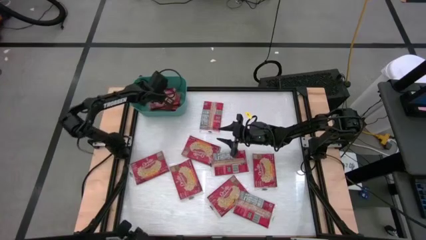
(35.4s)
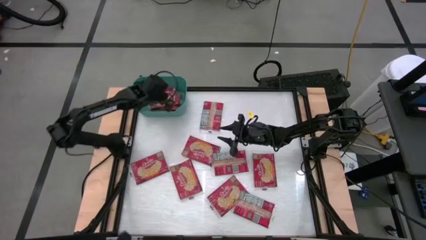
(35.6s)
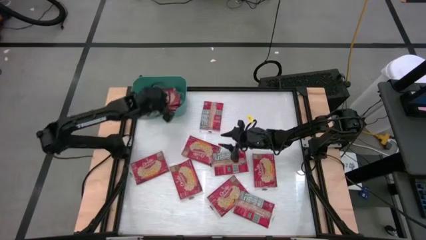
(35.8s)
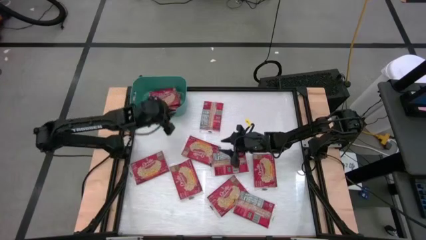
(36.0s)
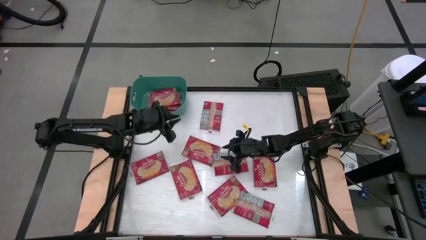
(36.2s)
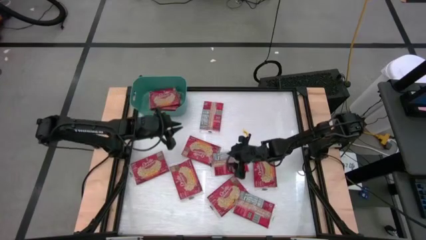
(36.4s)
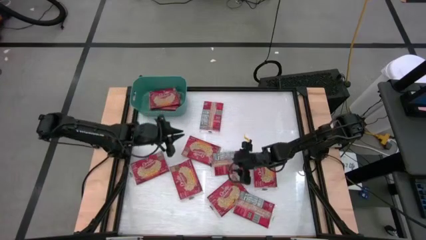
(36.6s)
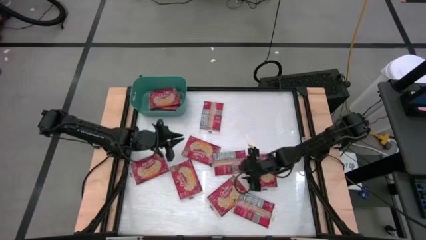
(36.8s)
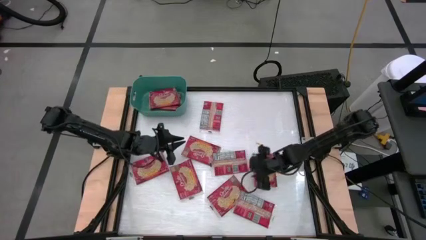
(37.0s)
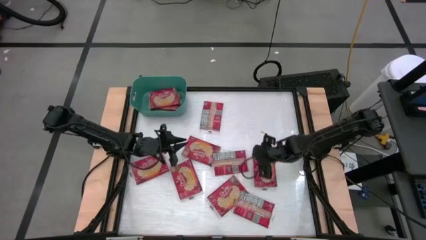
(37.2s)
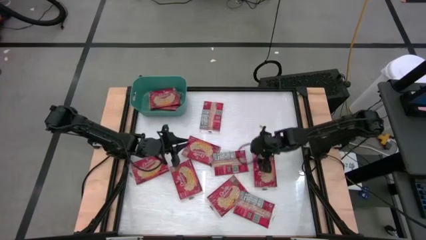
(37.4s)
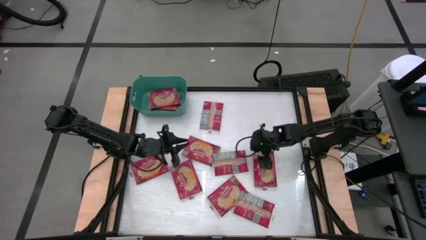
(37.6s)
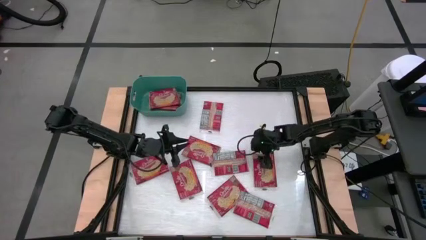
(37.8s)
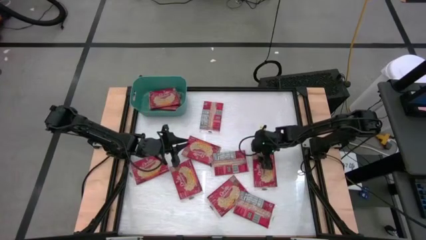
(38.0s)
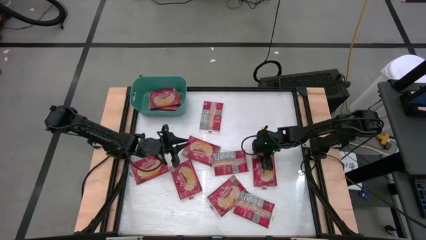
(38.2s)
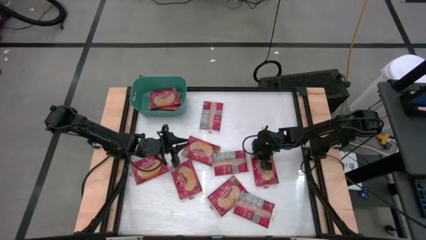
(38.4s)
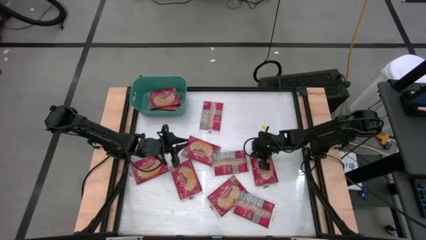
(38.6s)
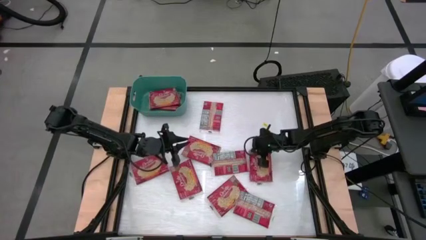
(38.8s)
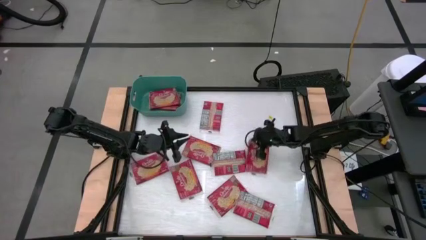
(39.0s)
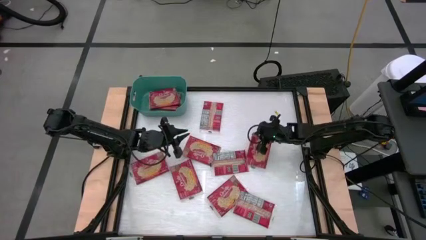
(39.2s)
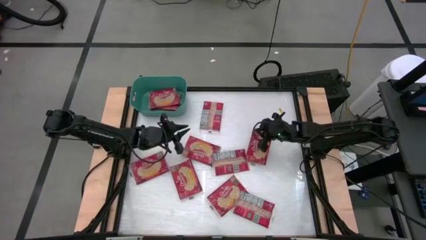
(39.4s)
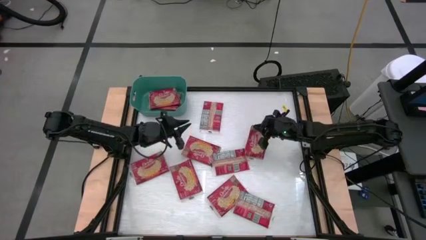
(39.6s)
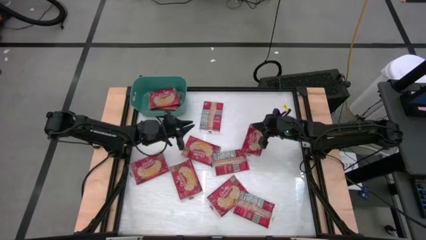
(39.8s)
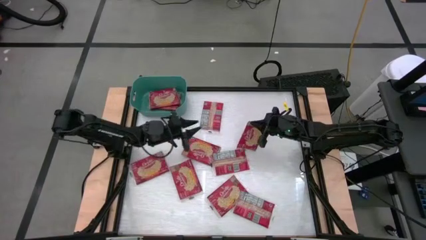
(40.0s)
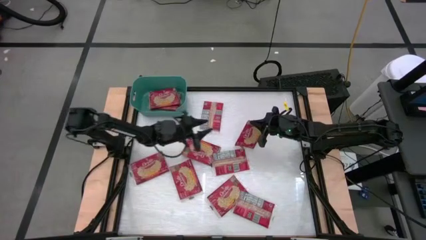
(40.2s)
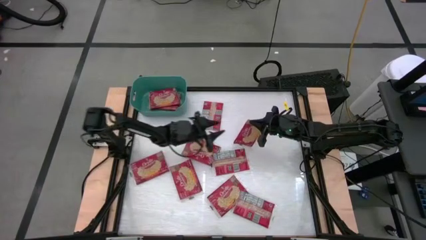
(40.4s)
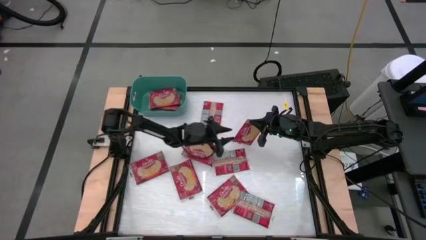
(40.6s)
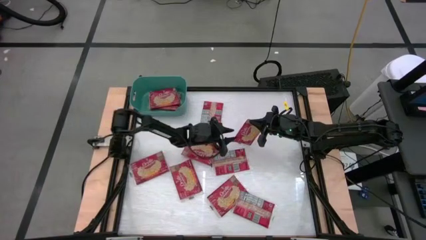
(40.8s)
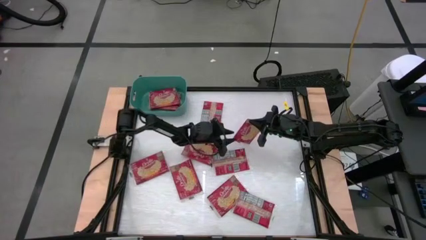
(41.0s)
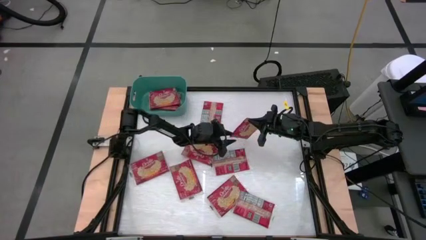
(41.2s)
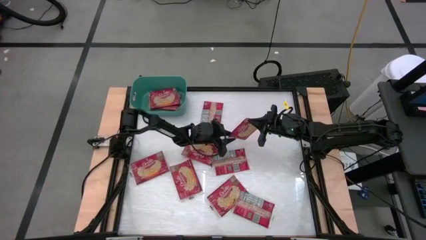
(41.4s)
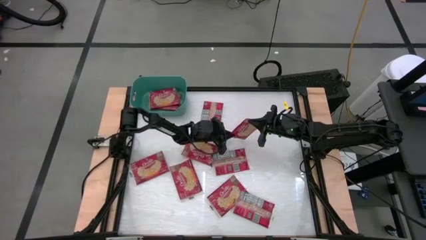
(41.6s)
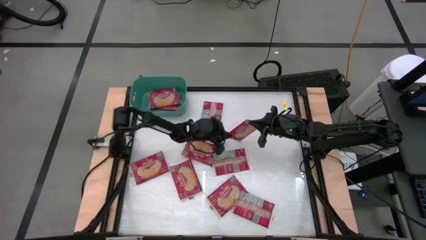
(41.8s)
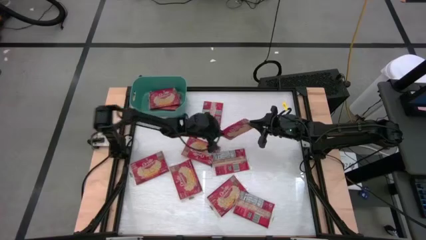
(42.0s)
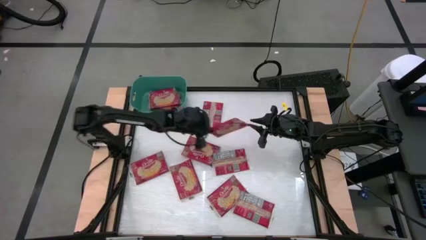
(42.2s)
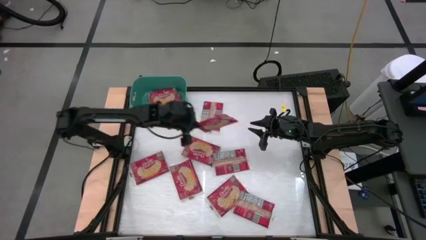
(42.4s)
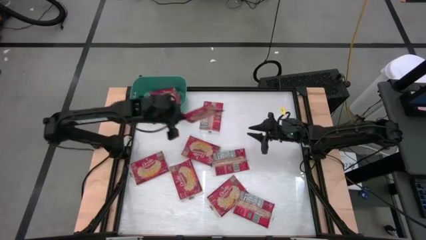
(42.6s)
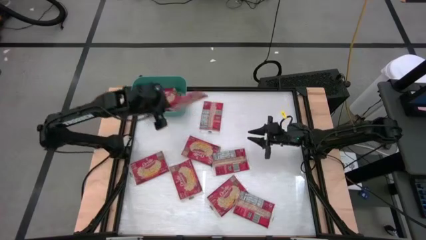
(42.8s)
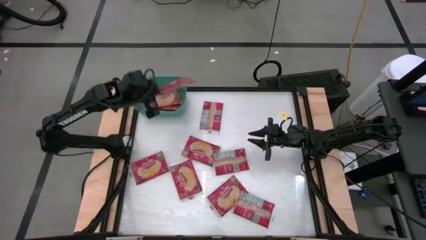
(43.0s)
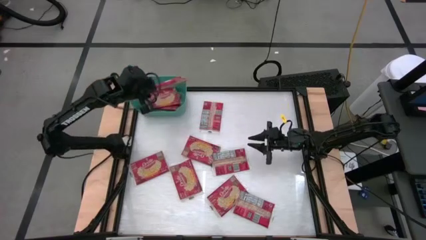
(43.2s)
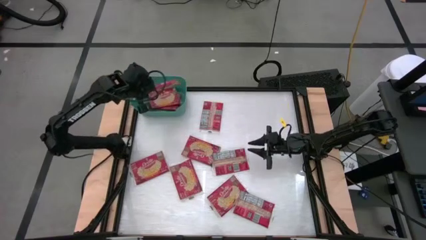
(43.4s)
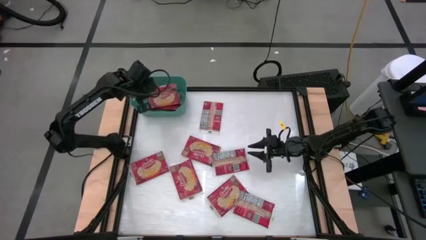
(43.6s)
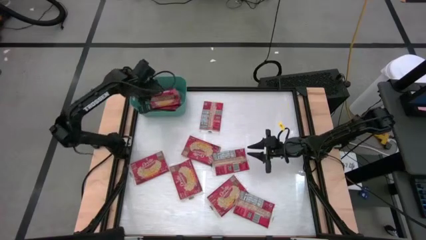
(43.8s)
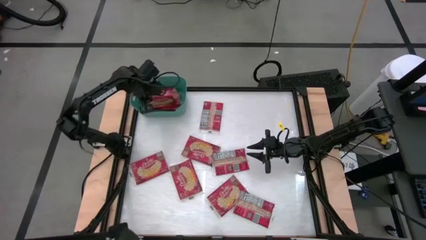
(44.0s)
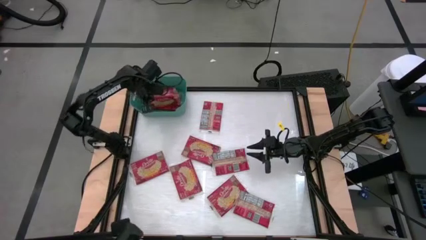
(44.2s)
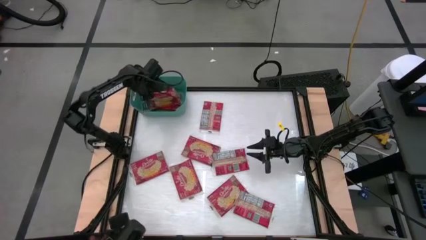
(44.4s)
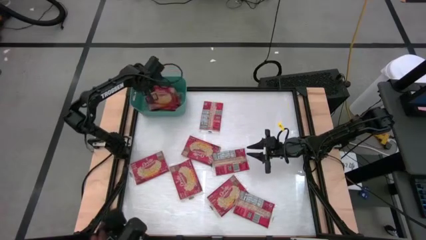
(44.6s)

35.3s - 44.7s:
Task: Sort popcorn bags into baskets
Stack the red popcorn bag on the red popcorn bags in the green bin

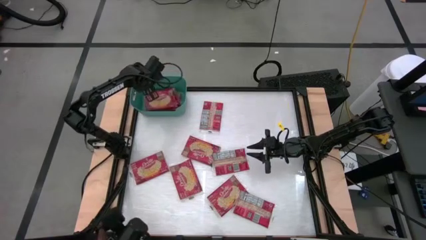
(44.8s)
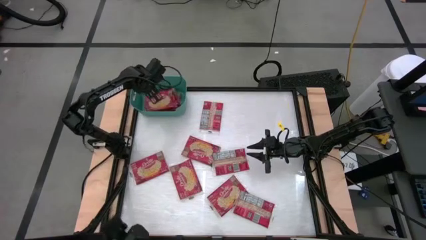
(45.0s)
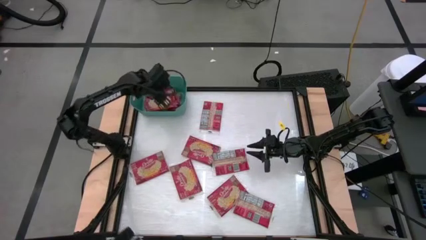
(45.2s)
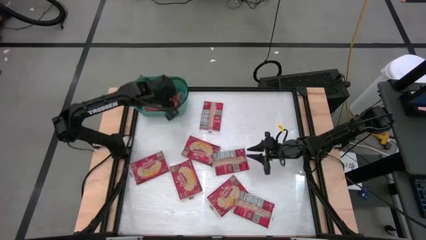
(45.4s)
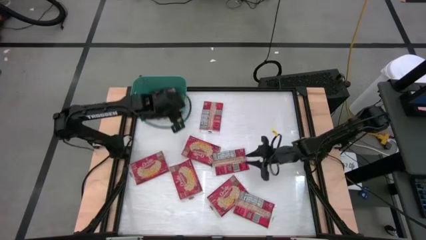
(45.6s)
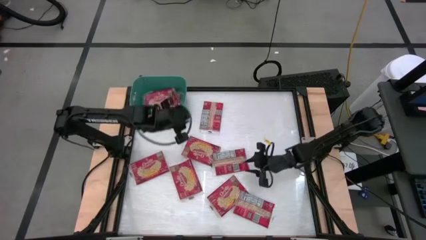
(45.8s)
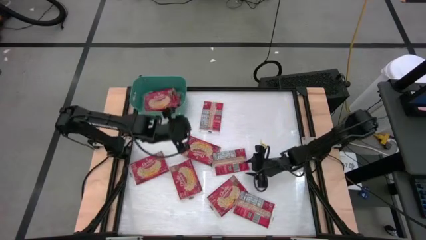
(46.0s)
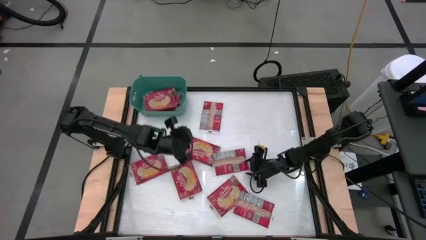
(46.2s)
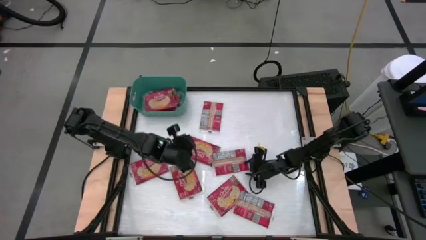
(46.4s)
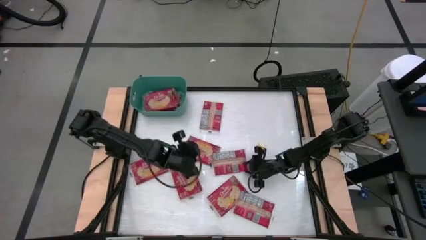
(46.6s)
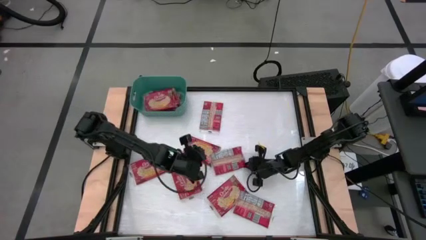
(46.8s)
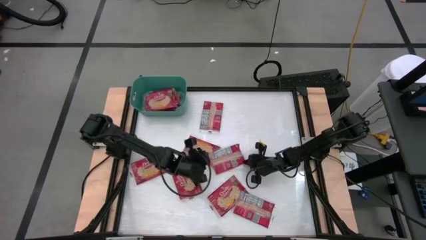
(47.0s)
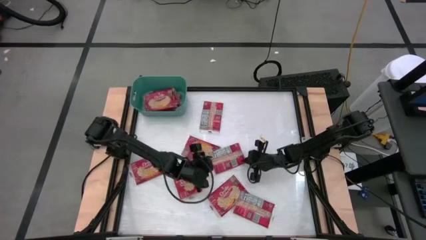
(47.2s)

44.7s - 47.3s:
Stack the red popcorn bag on the red popcorn bags in the green bin
